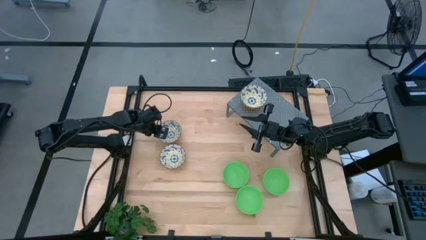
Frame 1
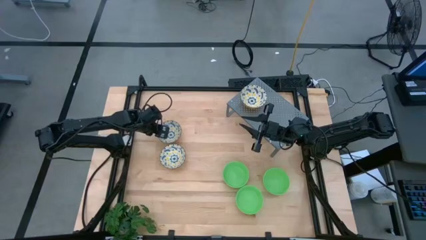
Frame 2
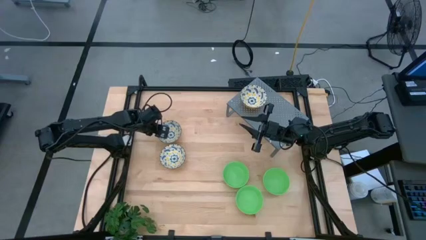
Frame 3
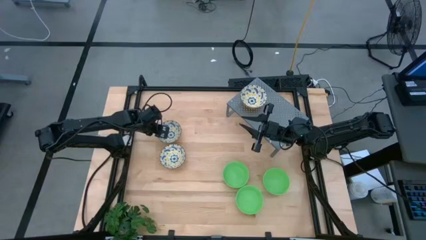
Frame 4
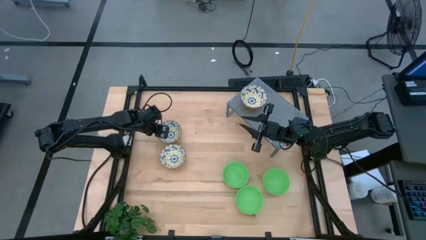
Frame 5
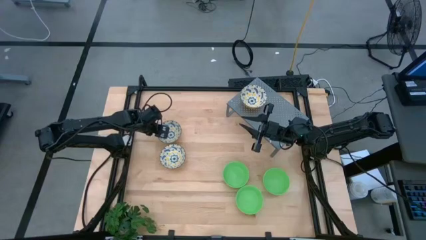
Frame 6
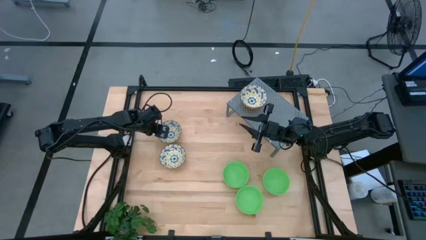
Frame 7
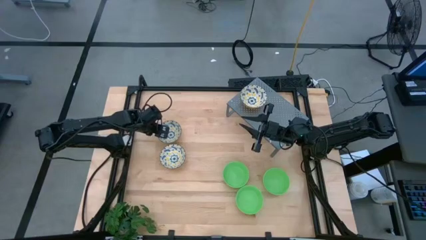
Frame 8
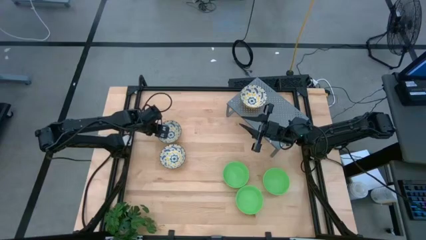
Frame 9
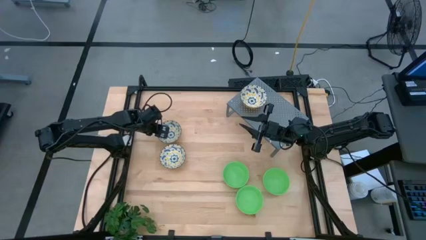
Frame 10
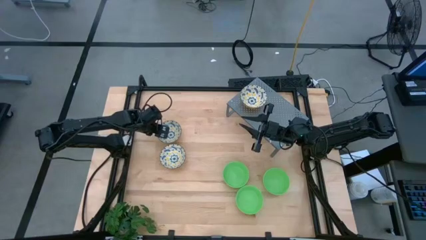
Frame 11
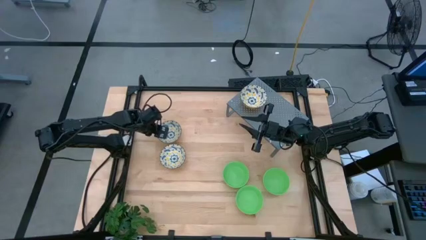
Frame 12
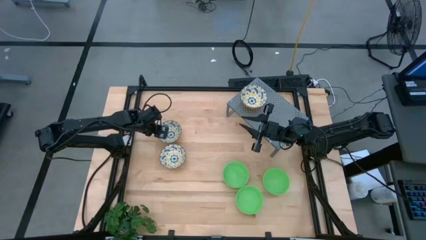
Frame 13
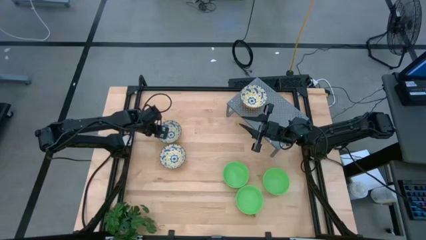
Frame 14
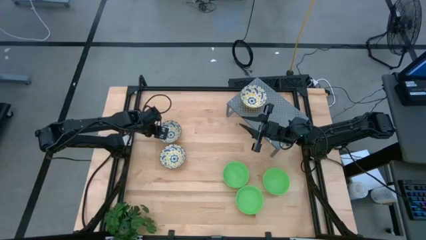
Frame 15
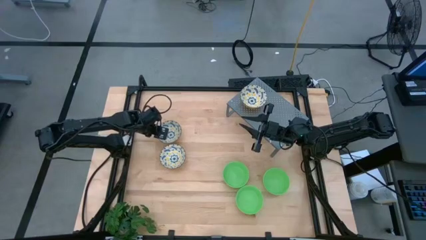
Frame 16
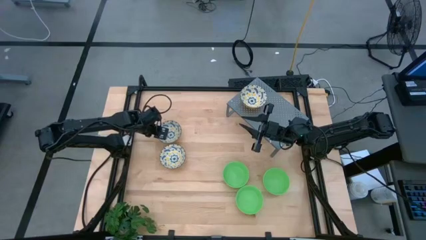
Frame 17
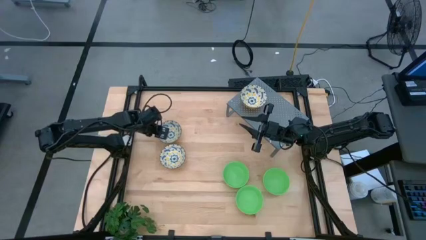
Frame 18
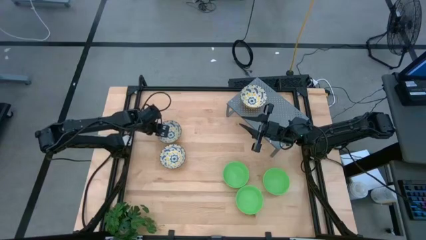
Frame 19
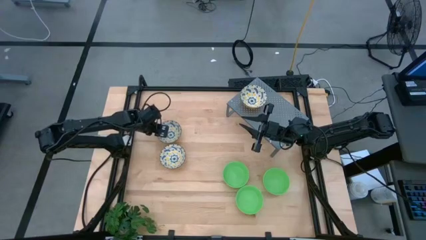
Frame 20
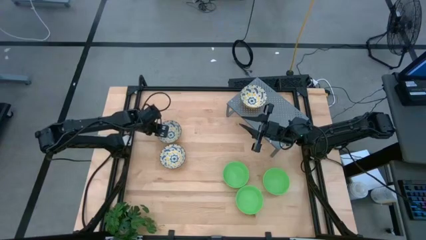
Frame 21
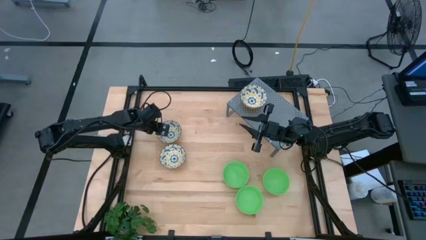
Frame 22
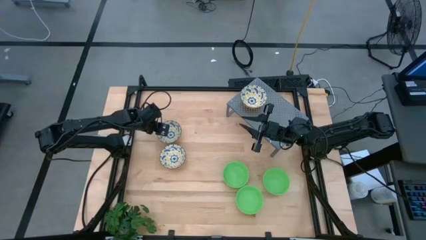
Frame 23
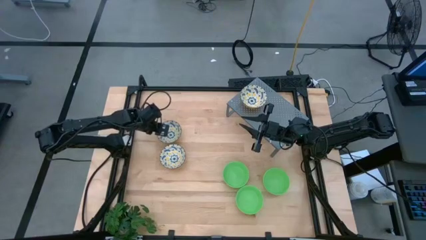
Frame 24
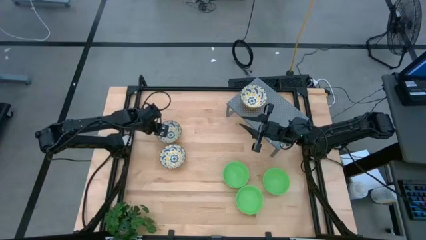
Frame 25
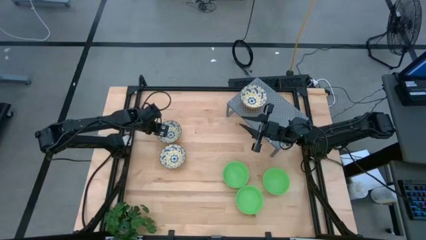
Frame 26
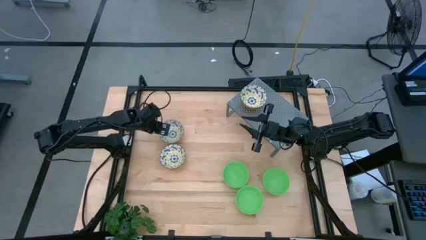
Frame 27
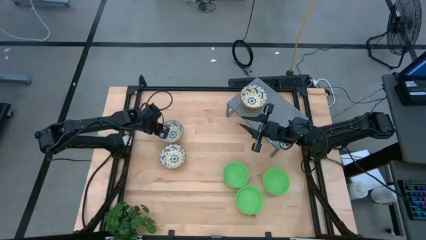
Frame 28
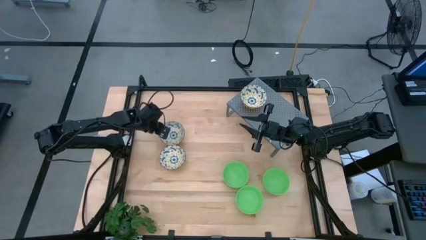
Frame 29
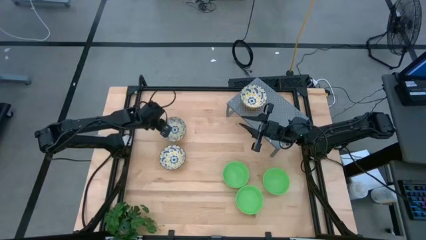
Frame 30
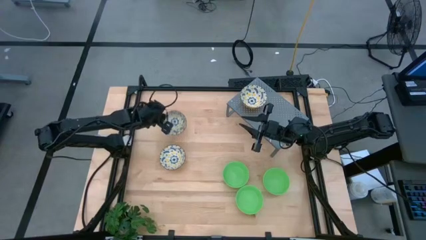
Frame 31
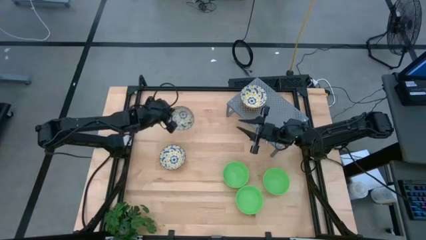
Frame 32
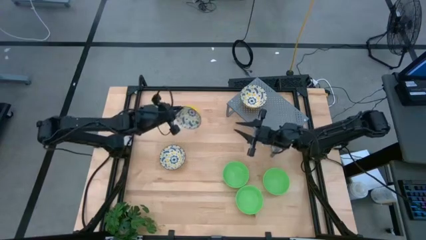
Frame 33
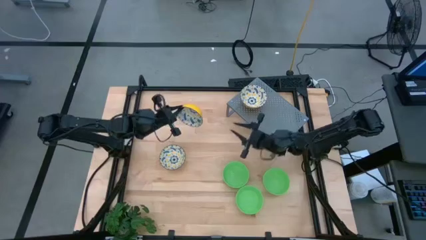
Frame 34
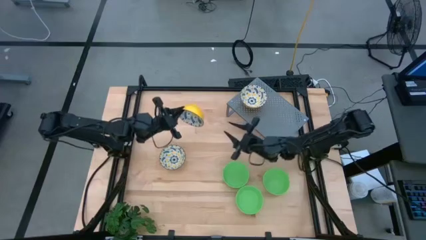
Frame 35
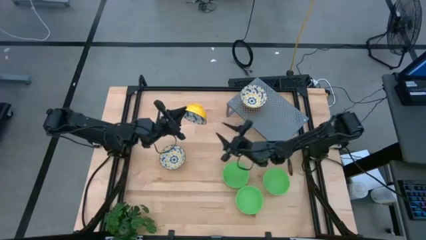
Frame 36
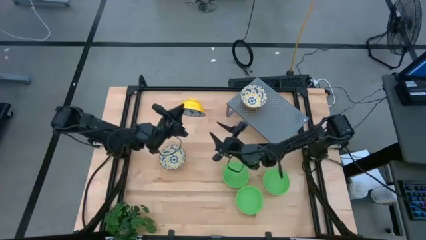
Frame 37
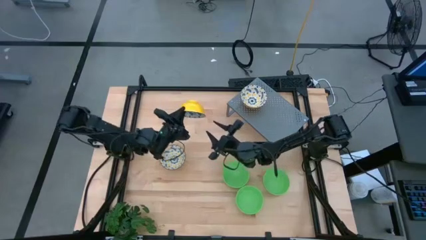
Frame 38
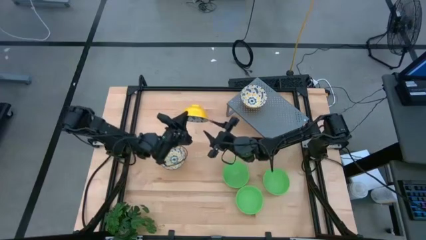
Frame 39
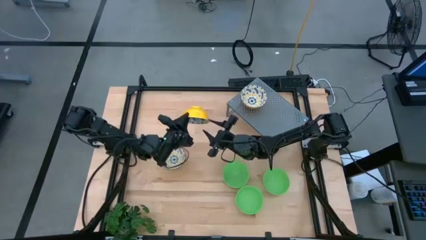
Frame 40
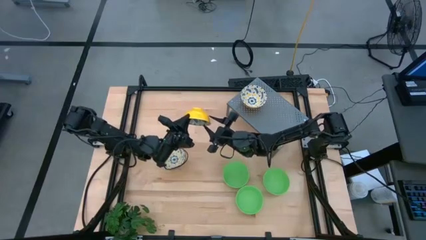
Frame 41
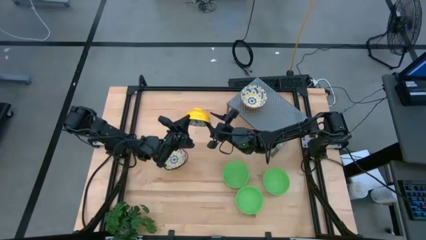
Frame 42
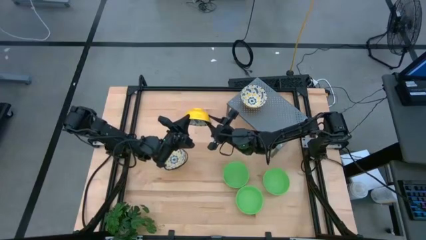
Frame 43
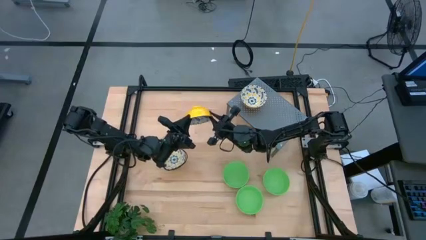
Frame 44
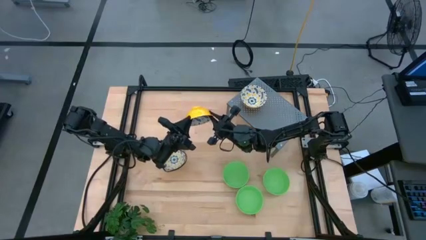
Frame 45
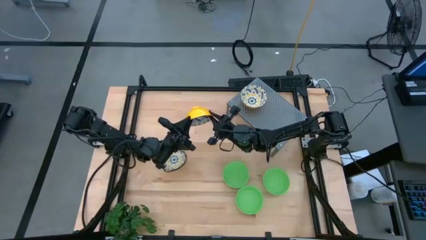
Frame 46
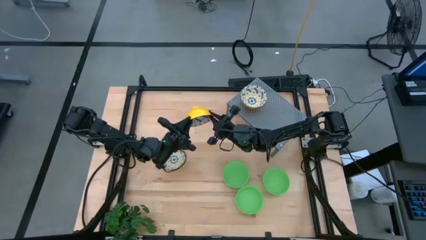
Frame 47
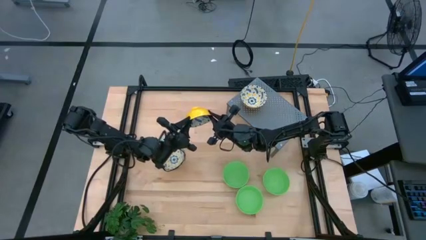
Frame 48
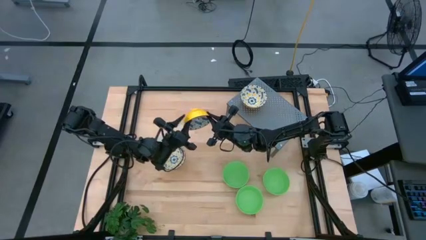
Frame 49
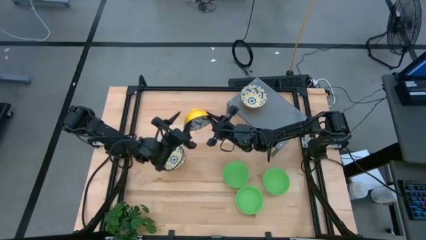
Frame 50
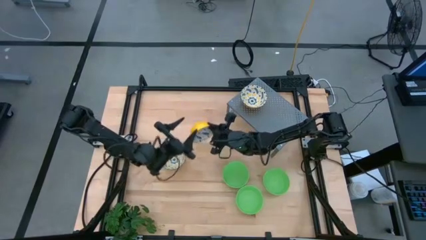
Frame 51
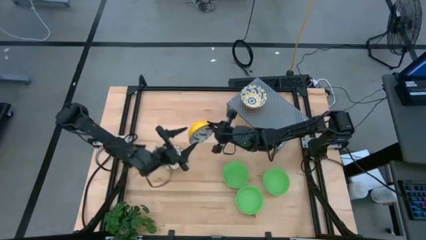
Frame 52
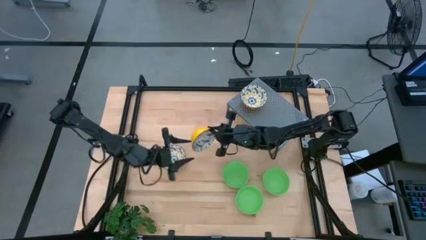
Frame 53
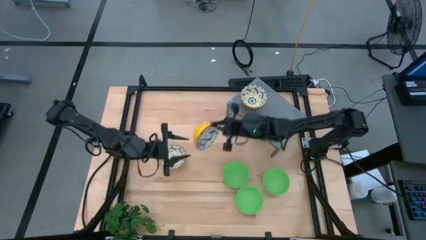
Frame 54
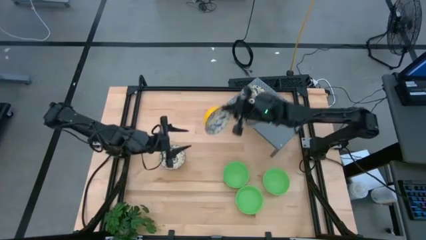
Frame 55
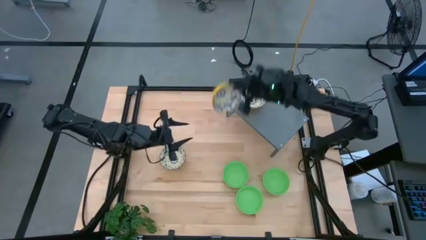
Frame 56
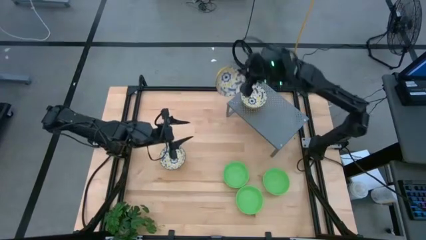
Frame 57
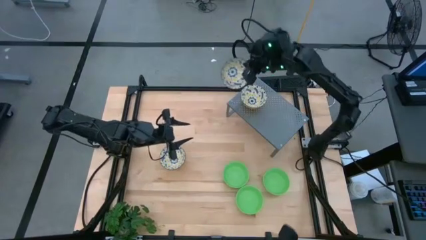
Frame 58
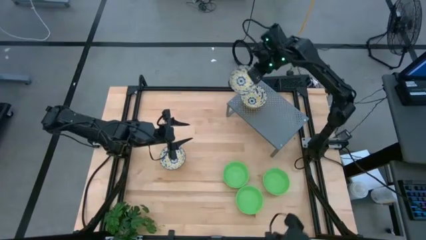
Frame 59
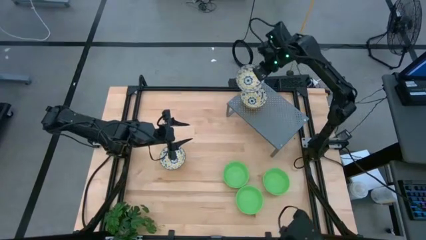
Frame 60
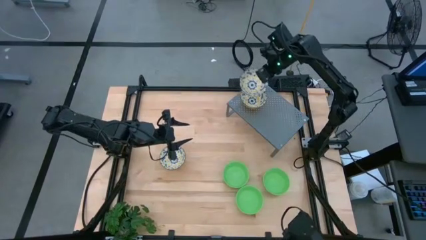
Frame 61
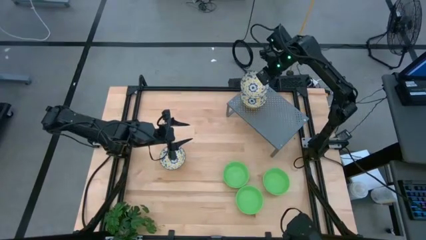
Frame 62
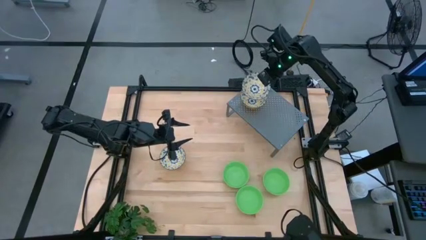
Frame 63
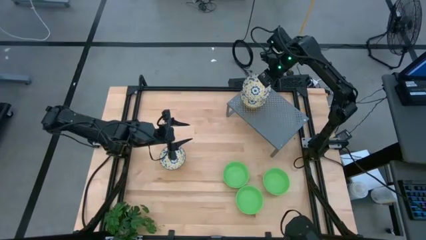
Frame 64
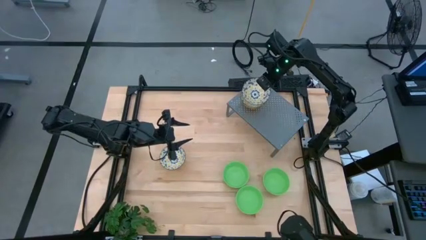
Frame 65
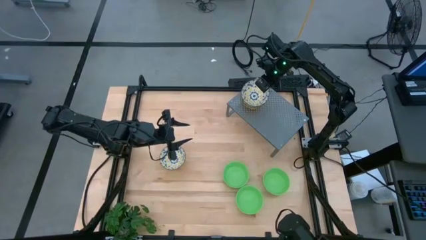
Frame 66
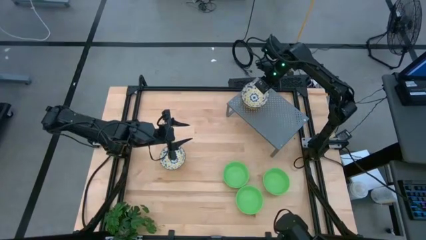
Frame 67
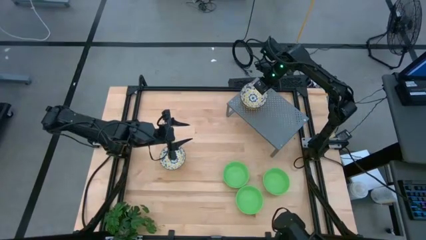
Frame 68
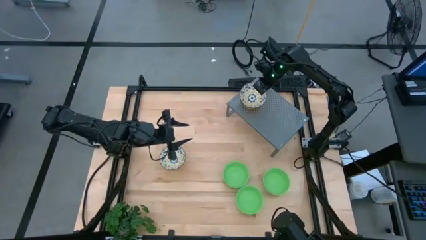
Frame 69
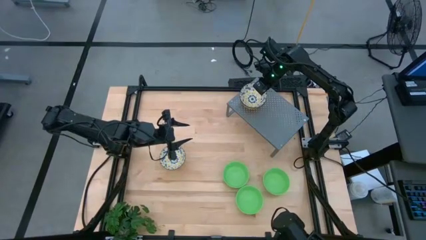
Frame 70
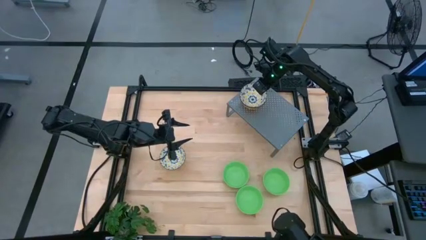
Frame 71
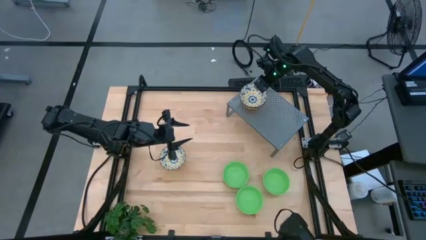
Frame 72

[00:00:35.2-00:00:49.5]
Task: Pick & Place Mini bowls
Stack the top yellow bowl on the yellow bowl on the shelf

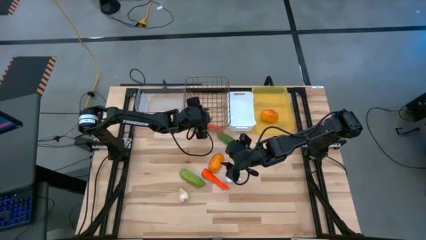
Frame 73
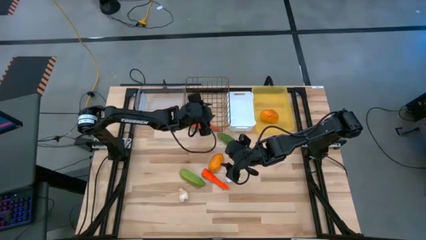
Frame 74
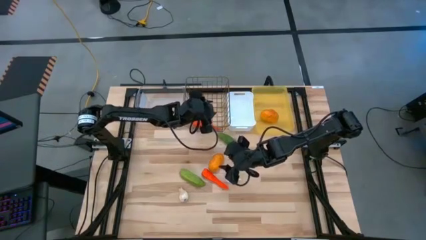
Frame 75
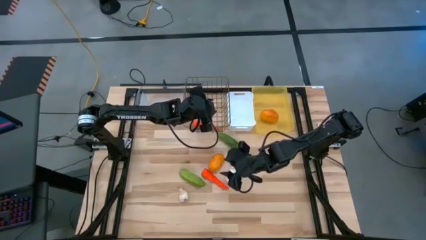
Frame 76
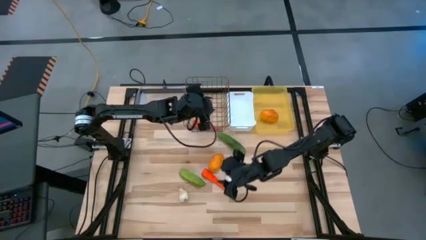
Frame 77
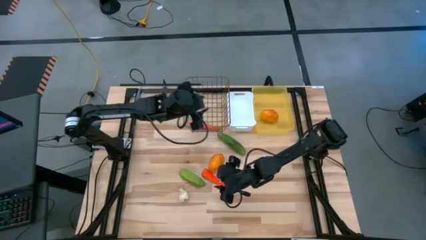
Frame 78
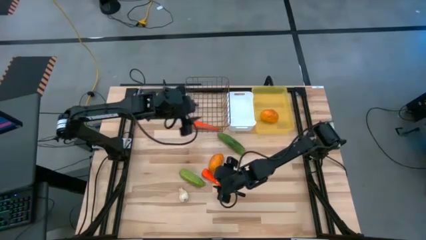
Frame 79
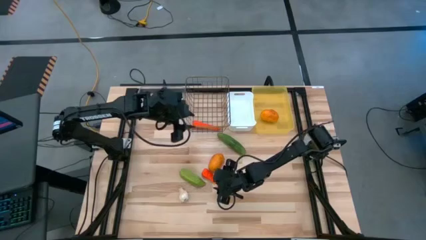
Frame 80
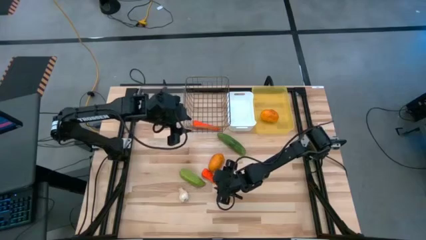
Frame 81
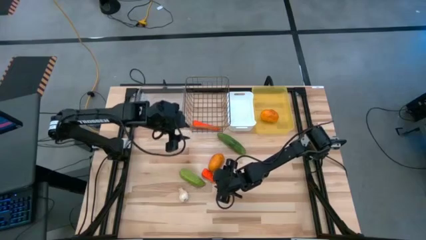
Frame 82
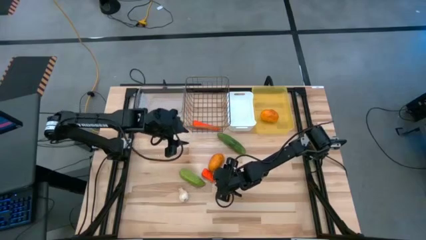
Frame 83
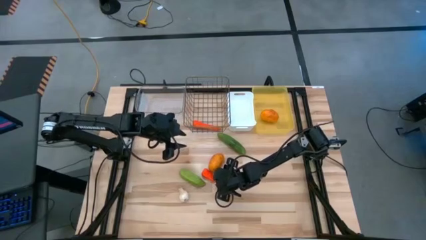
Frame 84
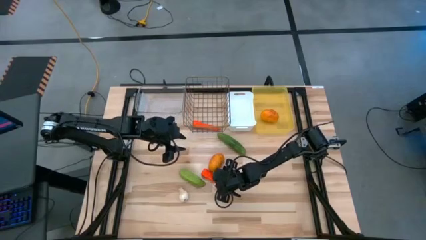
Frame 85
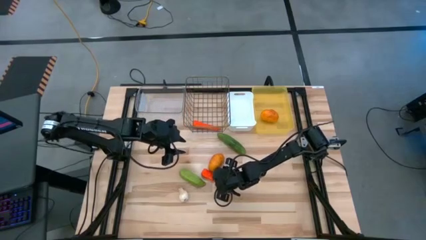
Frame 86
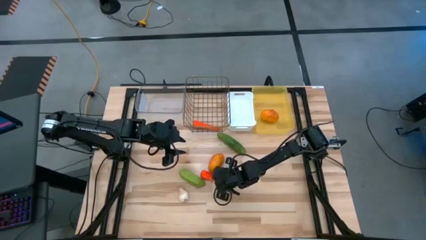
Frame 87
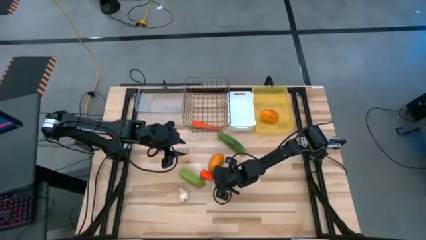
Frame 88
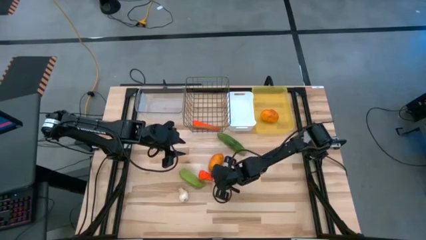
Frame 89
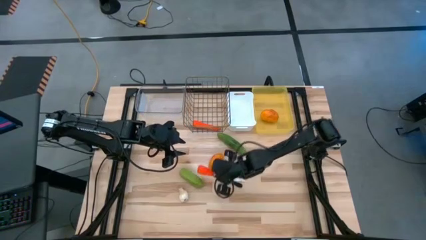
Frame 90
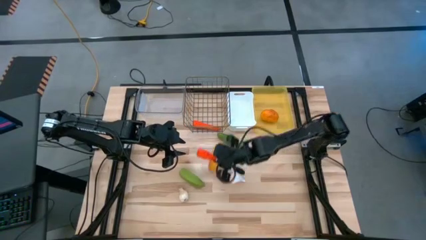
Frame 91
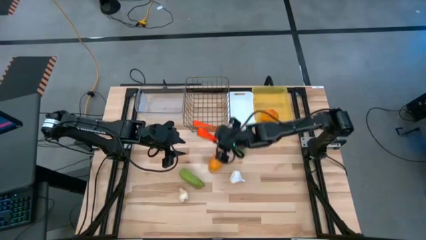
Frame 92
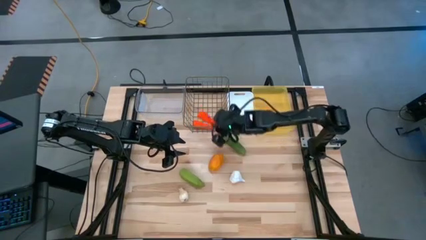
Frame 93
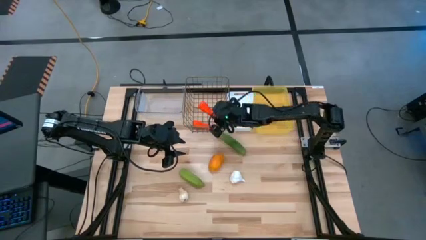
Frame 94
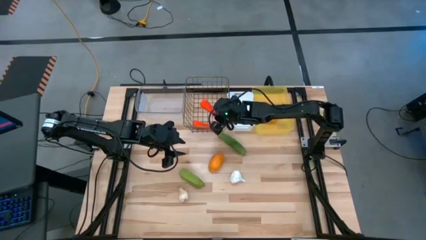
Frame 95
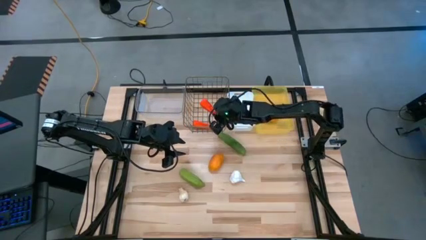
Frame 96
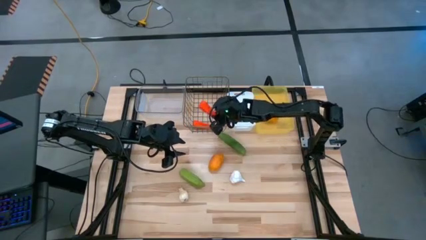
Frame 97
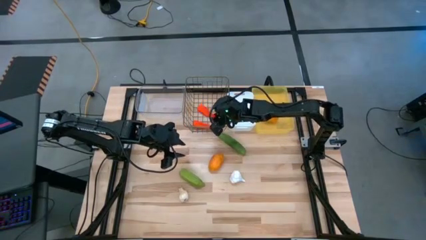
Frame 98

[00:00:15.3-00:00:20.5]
Task: Sort produce into baskets
Put the carrot into the wire basket
